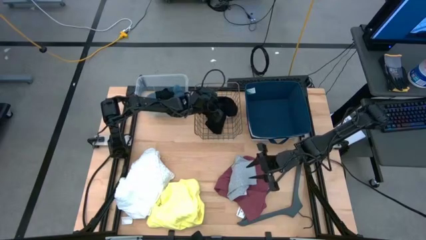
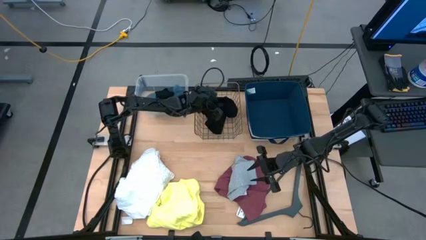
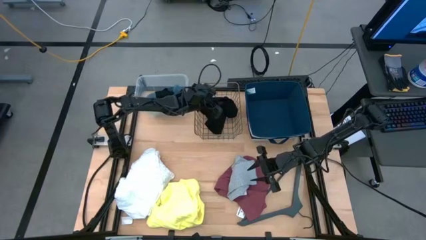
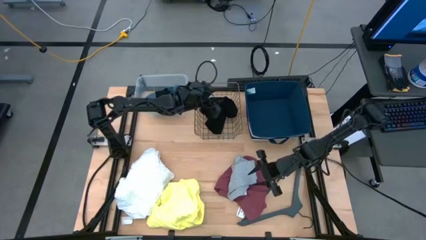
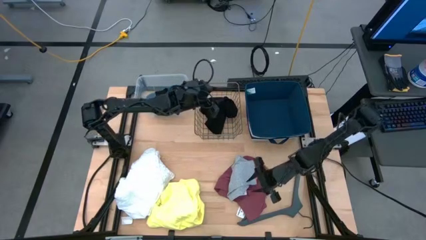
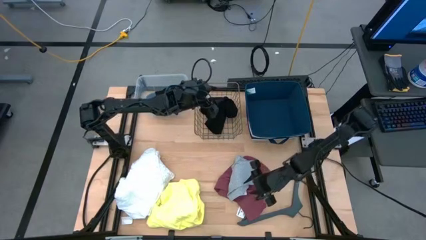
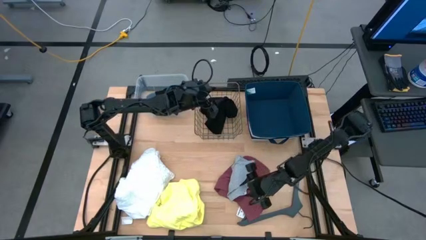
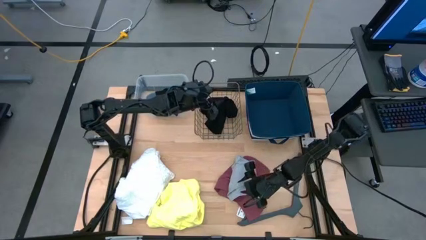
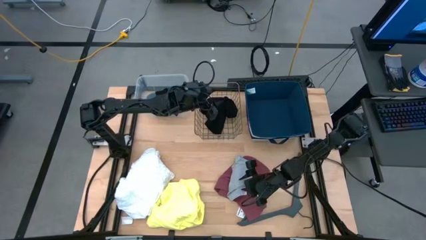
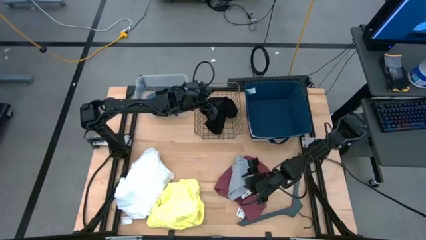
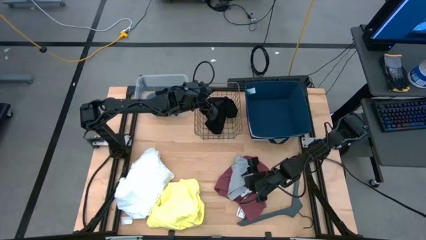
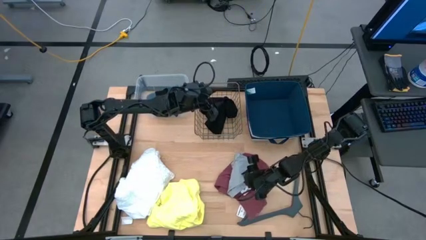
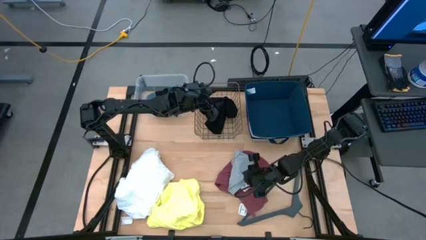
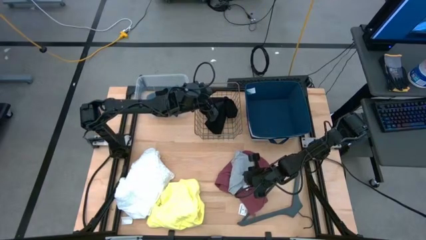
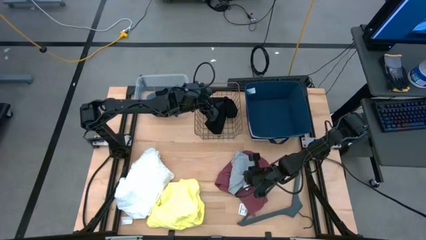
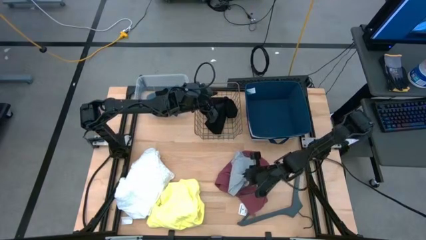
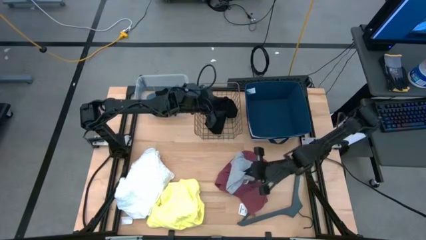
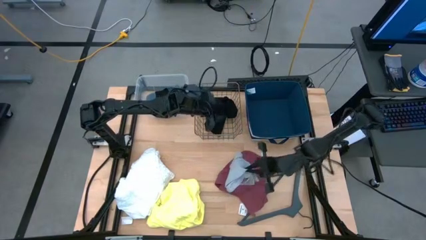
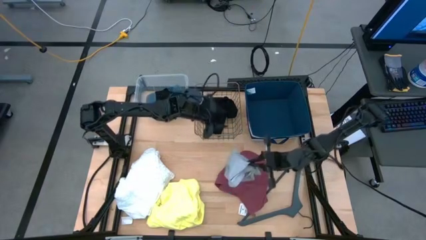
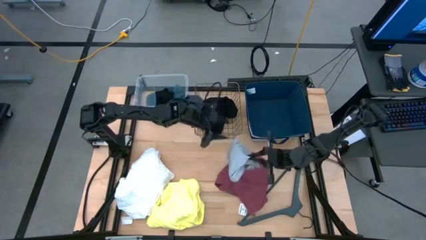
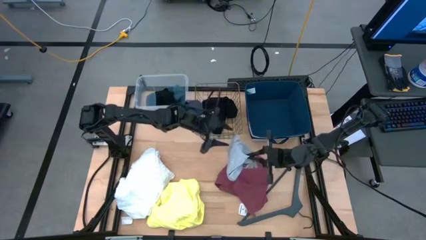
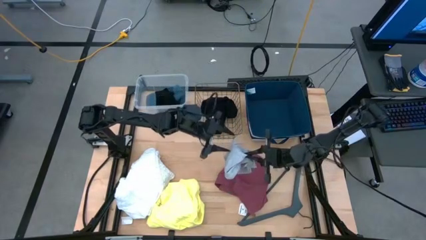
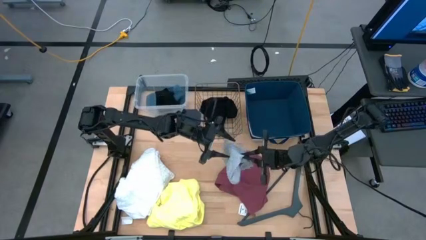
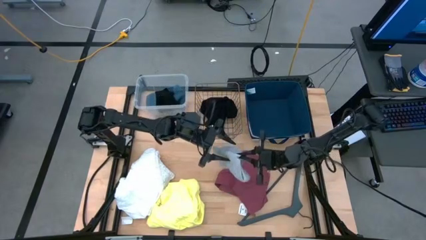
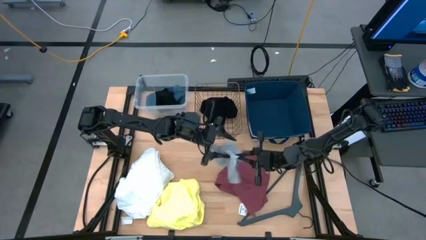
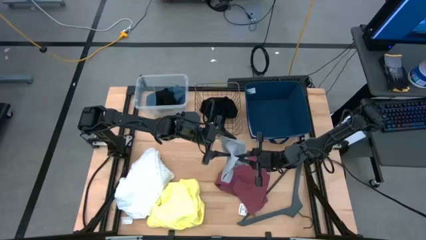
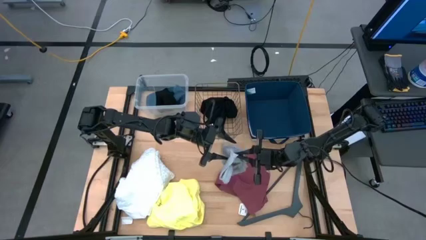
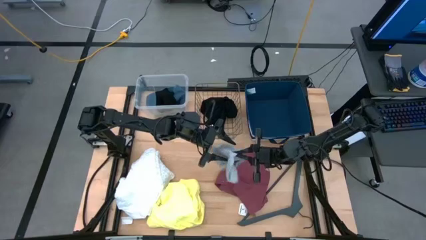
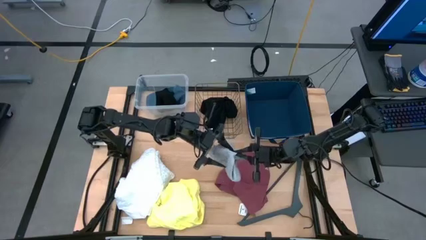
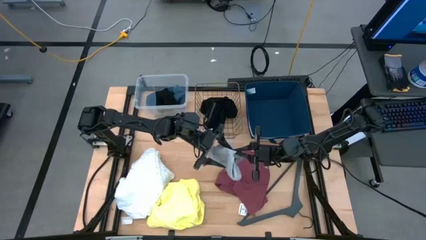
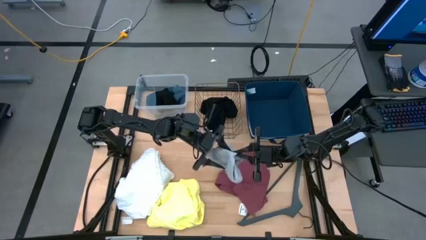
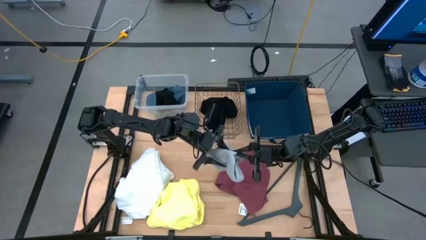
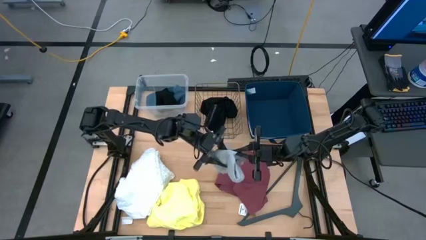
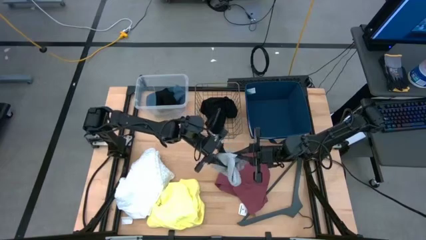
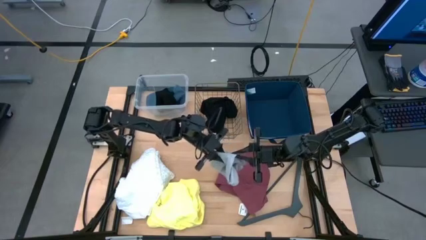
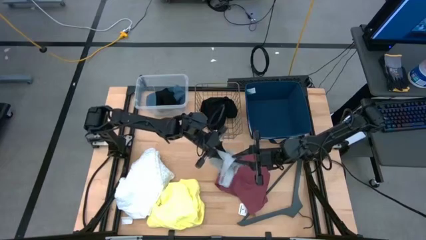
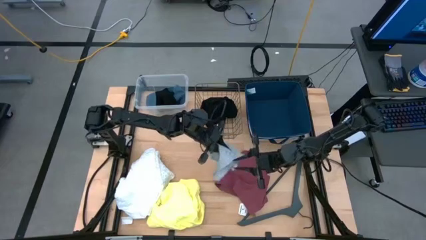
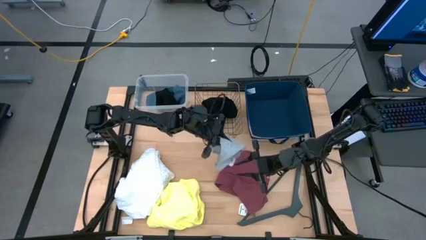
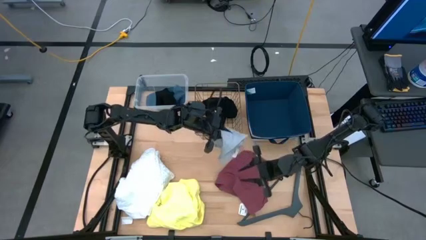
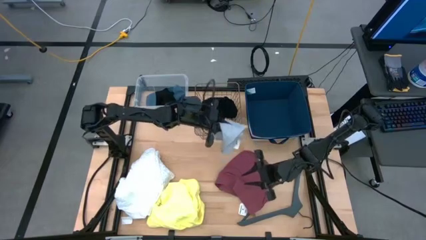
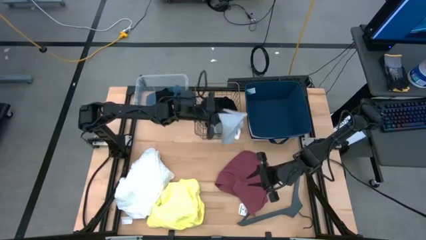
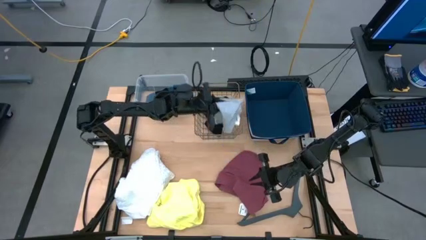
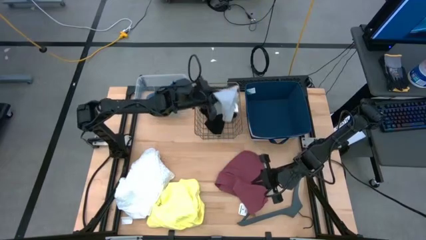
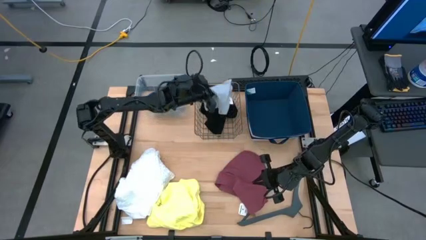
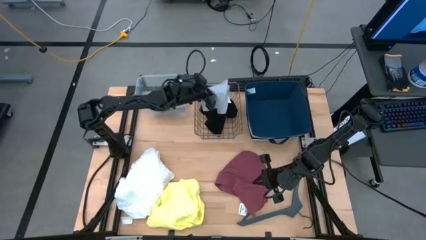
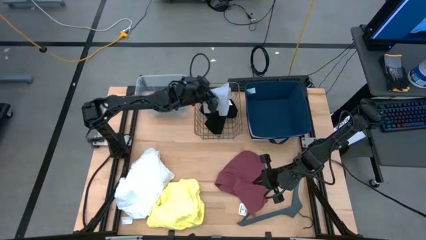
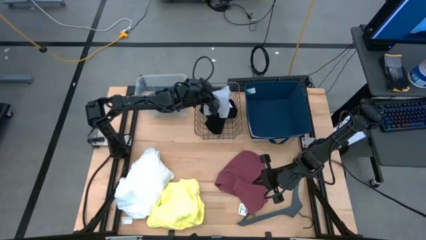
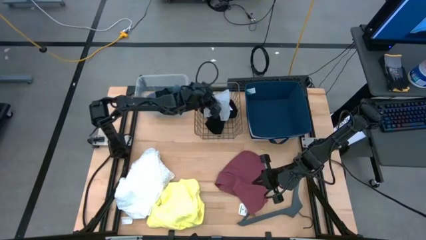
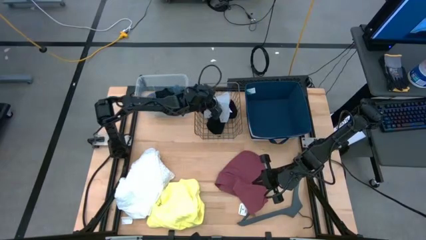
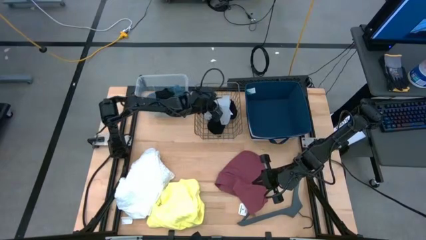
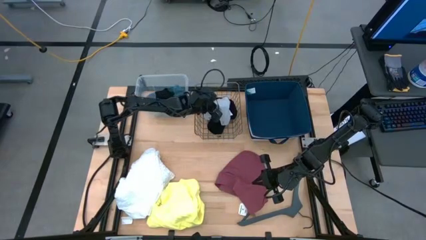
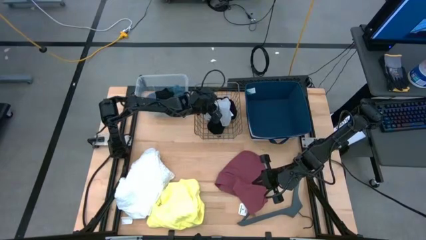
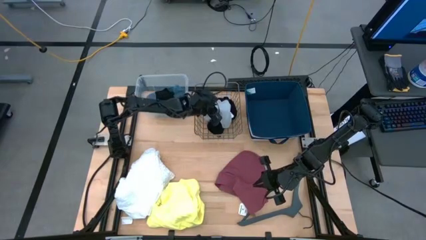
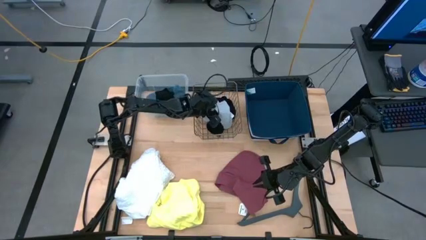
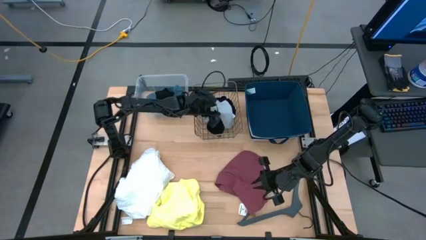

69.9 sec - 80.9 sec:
Task: Pick & Place Cloths
Put the grey short into the gold wire basket

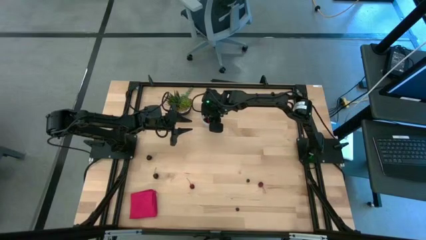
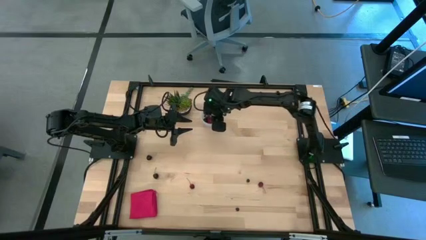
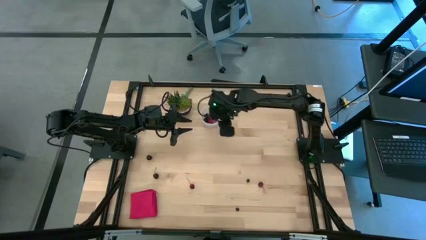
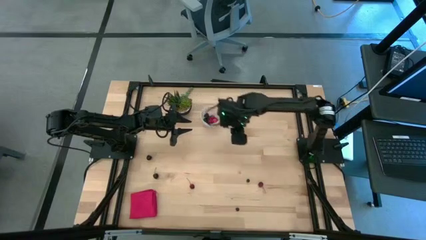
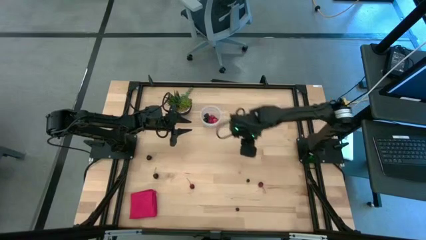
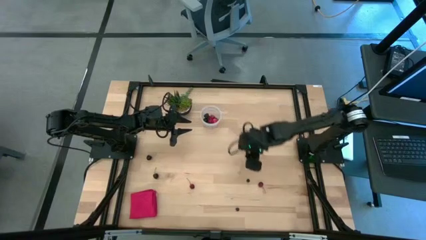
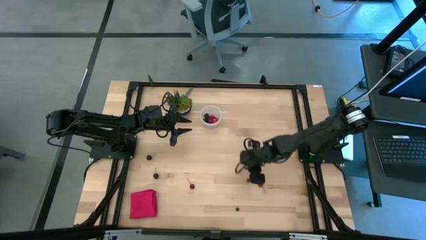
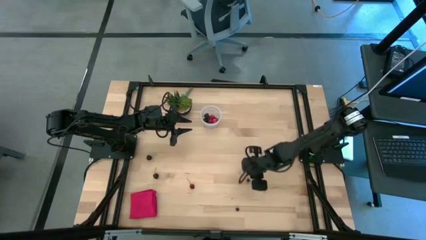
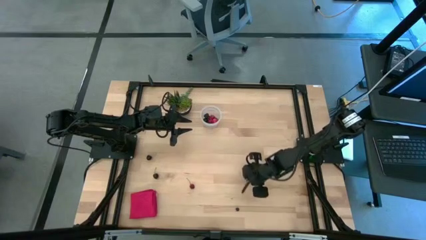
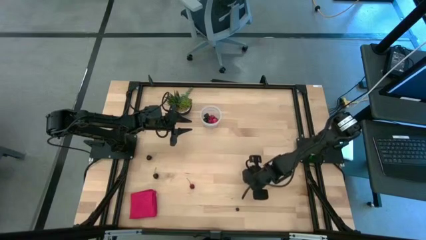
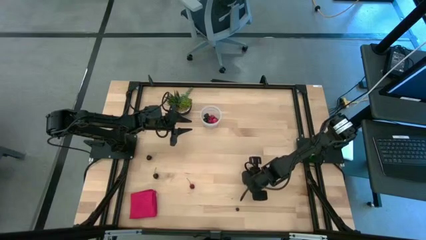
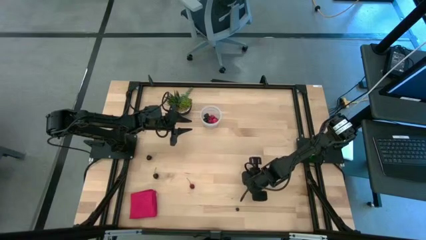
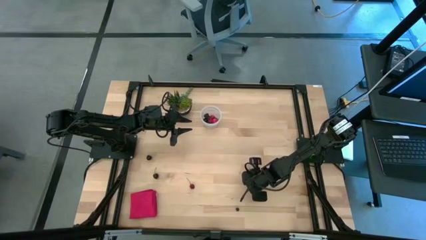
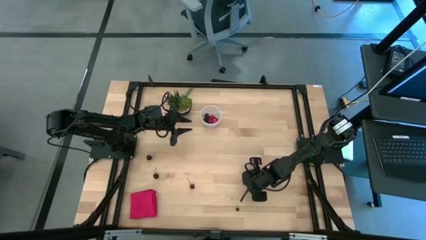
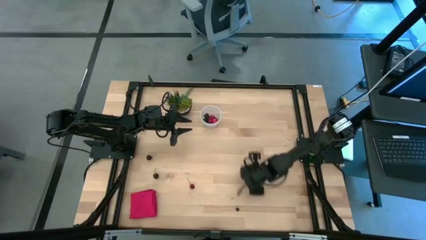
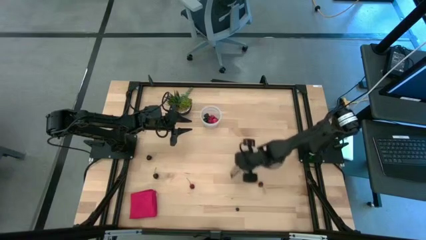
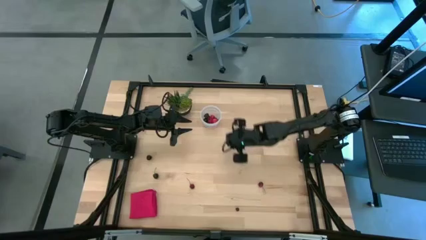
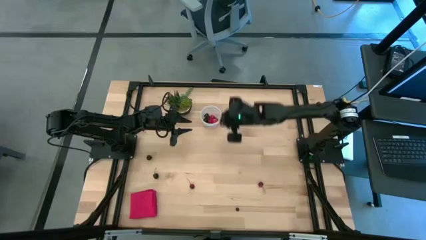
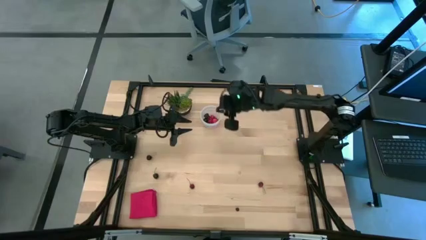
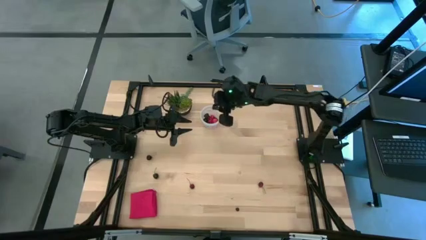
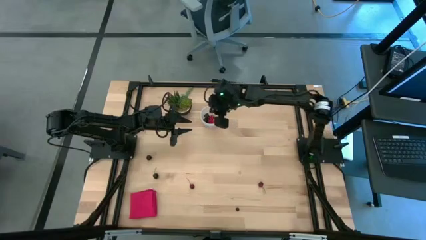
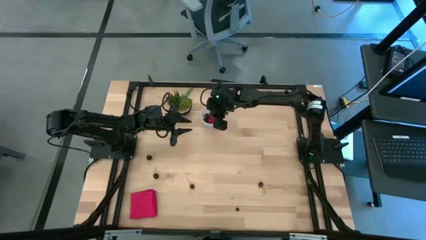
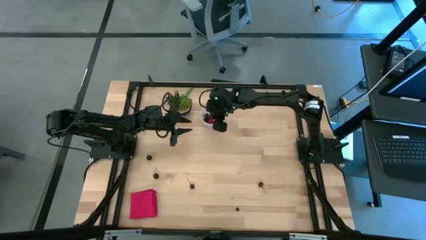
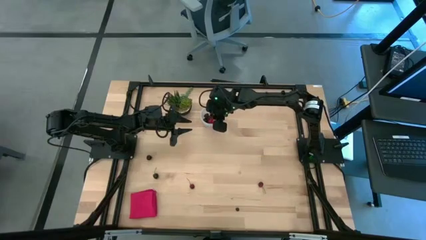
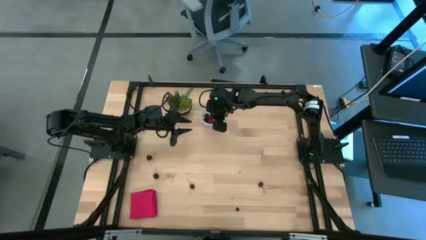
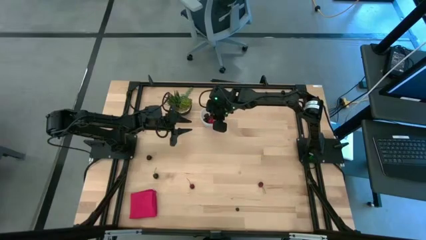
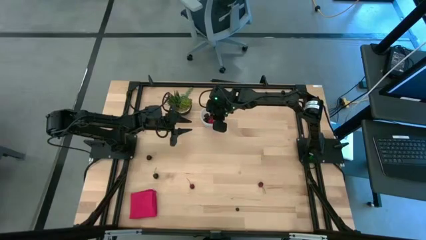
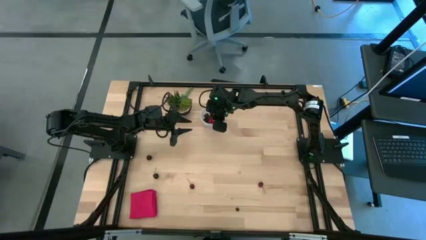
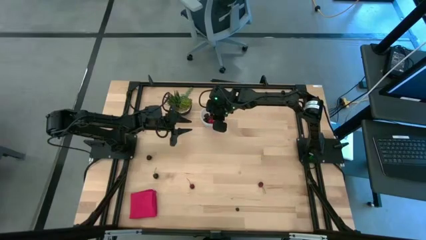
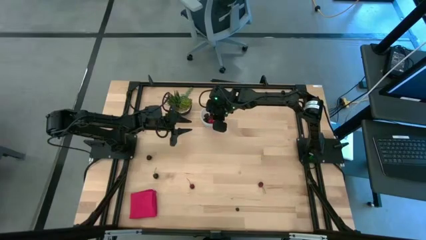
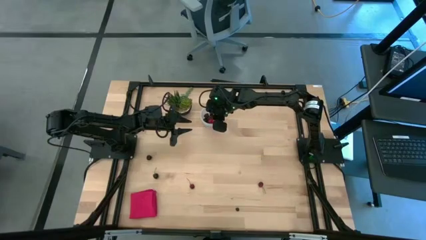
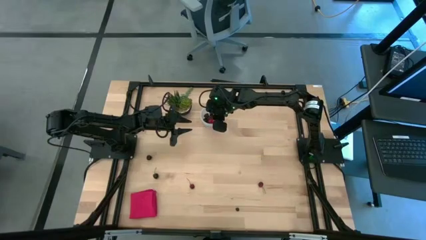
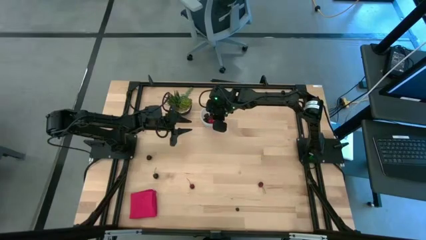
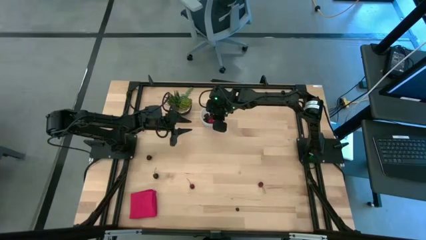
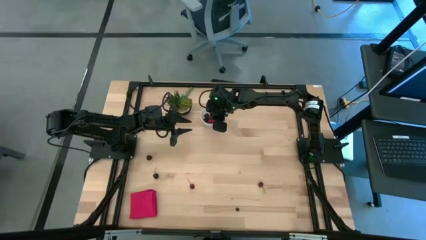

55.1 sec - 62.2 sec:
Task: Pick and placing Produce into tupperware
Put the blueberry into the transparent container
